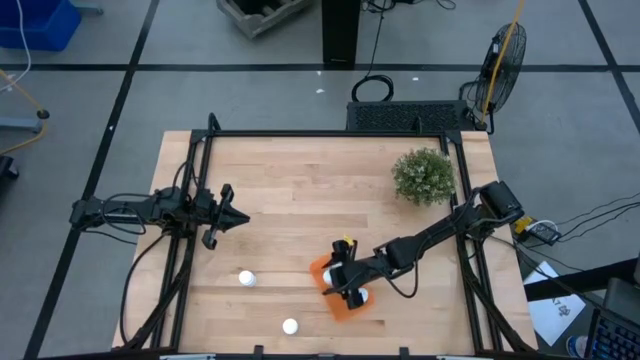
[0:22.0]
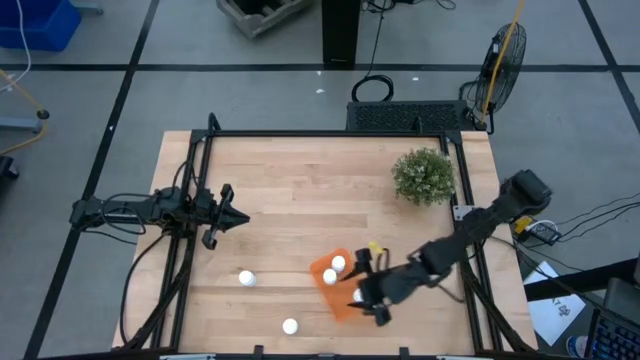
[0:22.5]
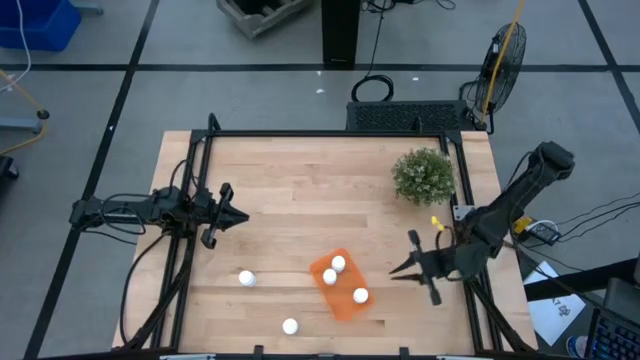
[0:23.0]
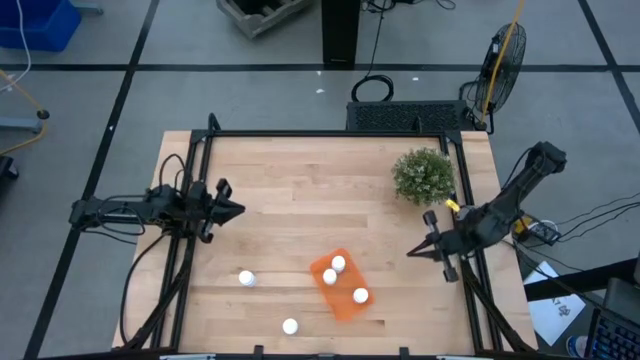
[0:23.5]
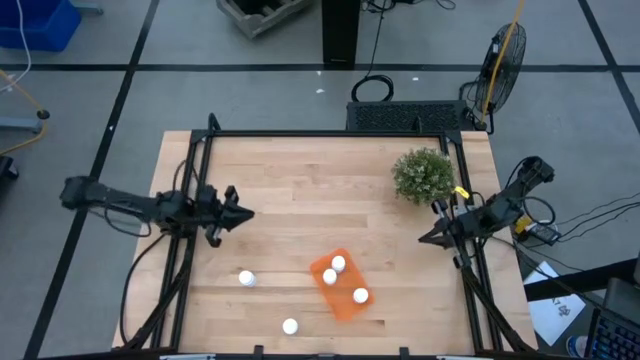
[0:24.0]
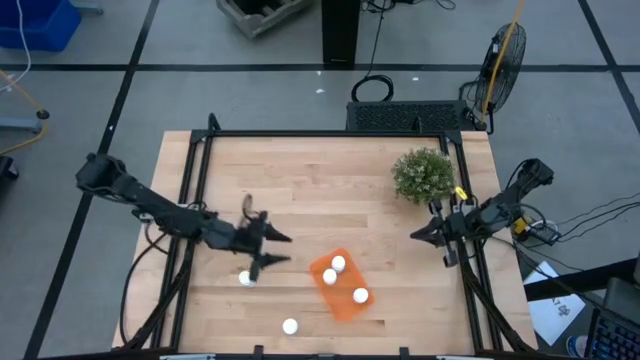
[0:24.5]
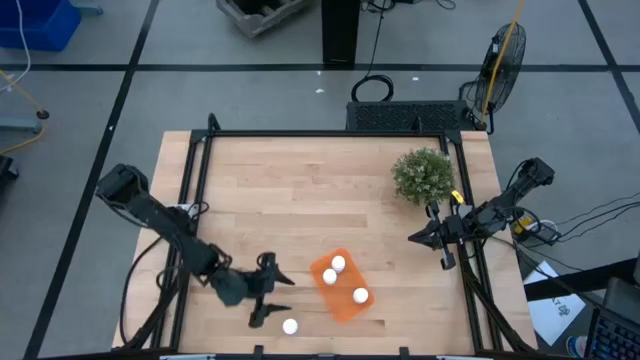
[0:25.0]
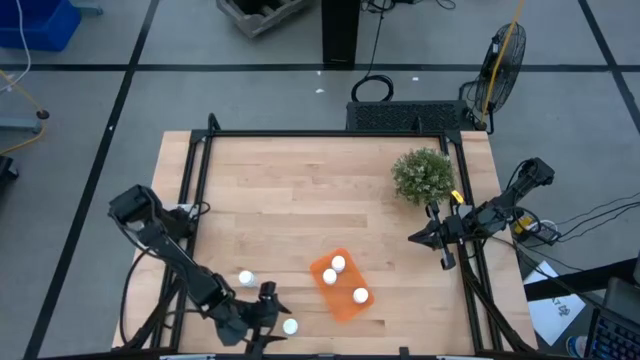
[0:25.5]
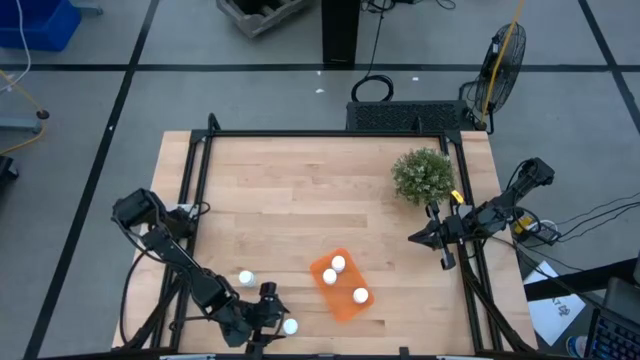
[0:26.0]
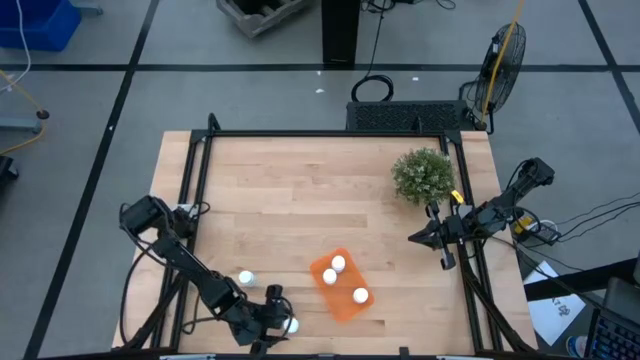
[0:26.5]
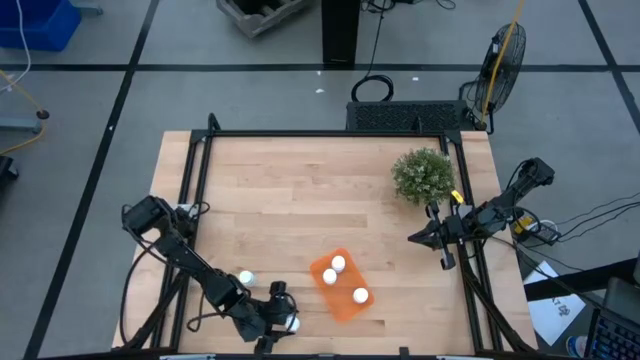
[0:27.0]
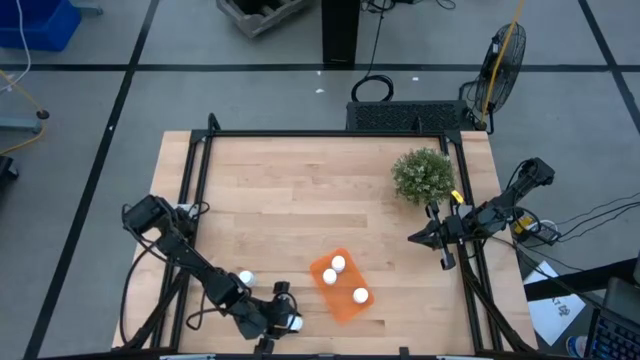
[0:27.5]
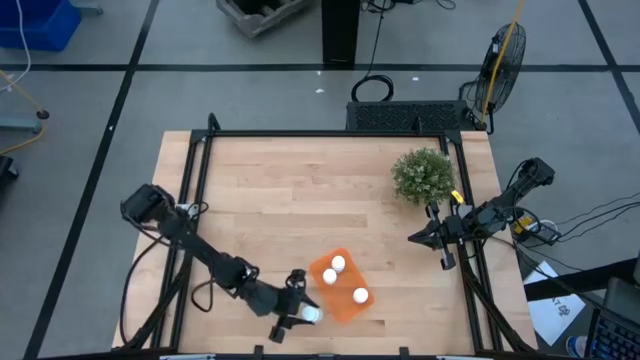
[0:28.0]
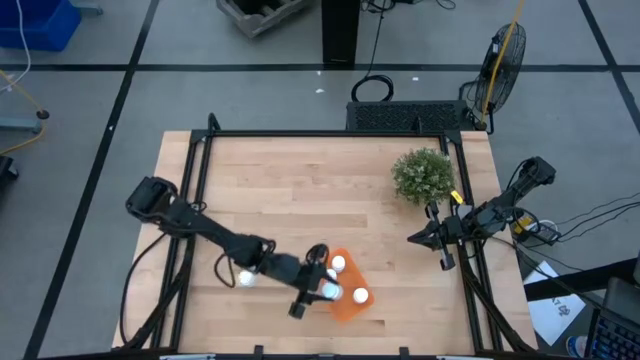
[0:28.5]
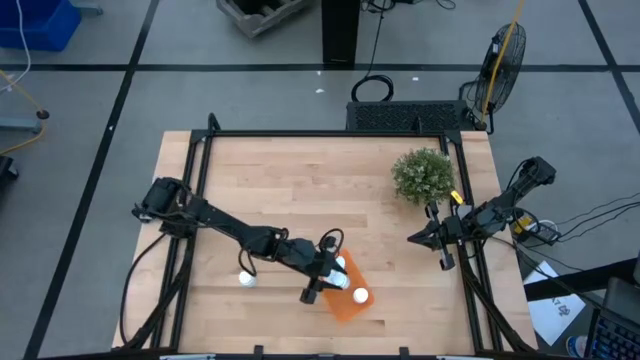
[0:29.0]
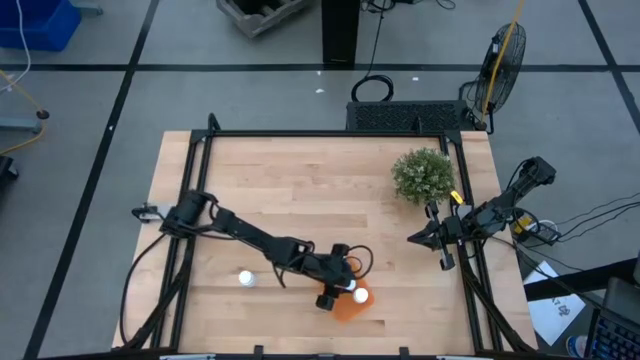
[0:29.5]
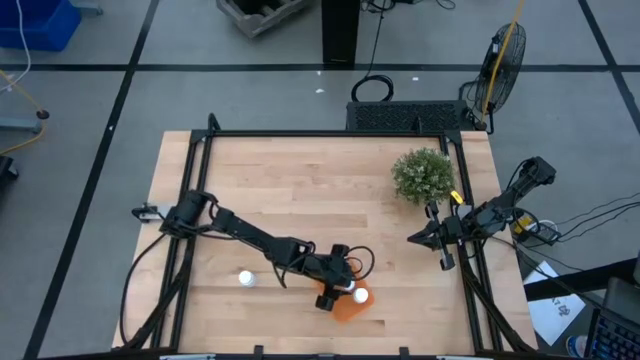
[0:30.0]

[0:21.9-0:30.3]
Task: Pick and place pill bottles into a basket
Put the white pill bottle into the orange bin

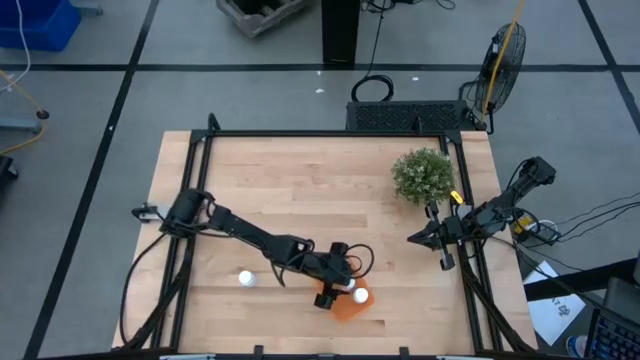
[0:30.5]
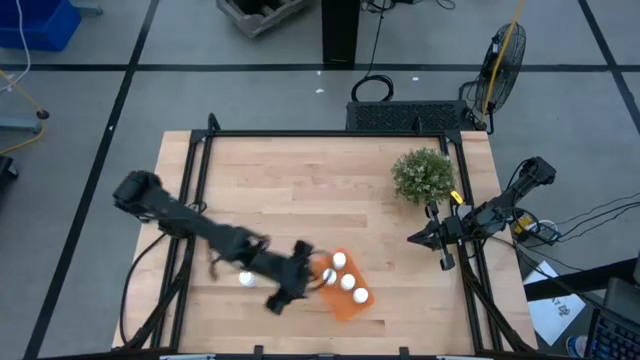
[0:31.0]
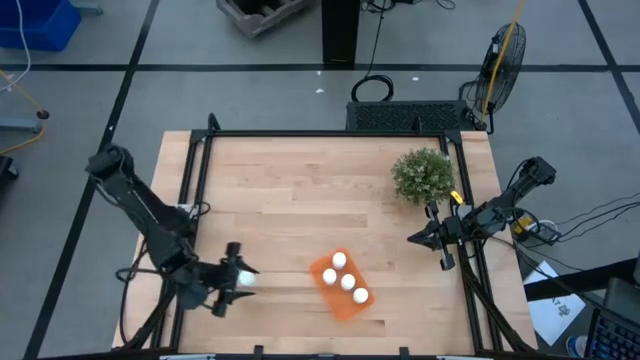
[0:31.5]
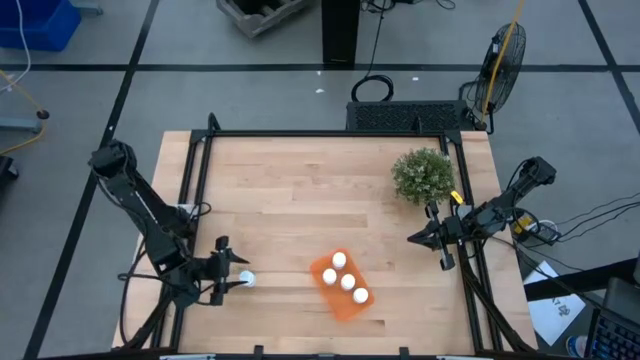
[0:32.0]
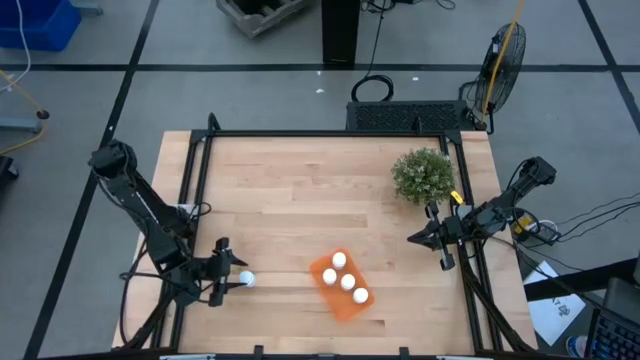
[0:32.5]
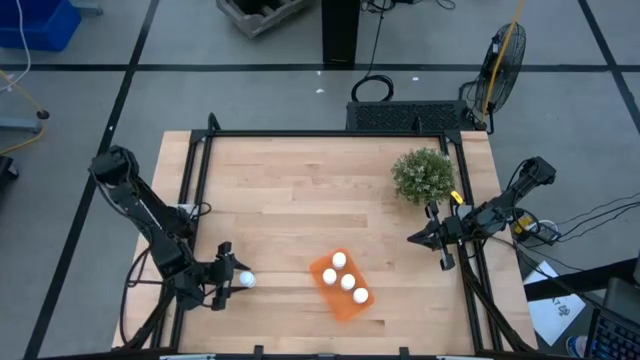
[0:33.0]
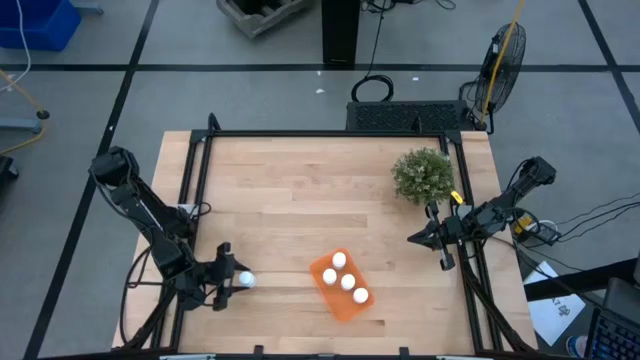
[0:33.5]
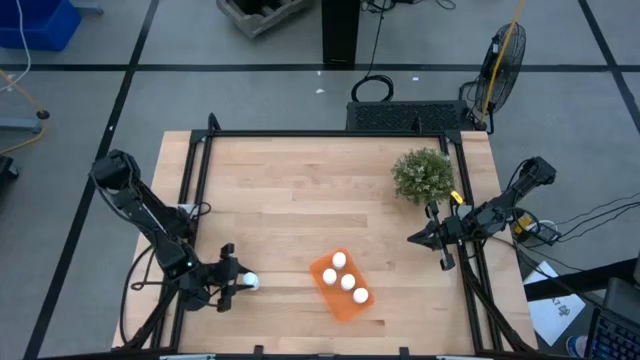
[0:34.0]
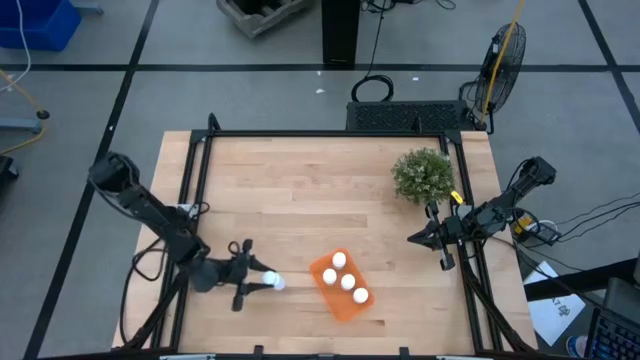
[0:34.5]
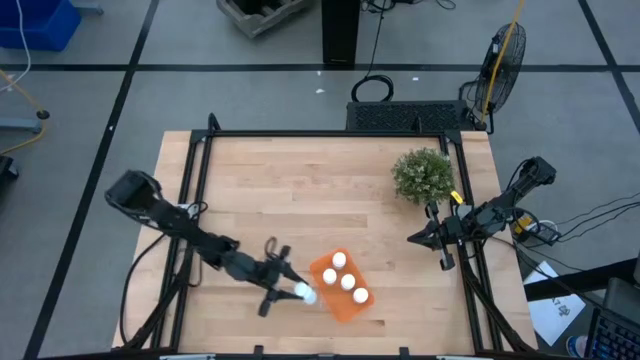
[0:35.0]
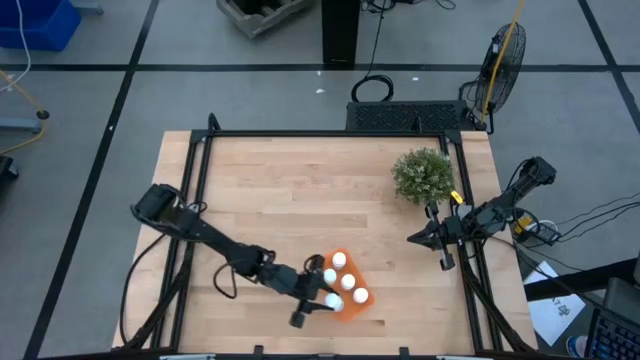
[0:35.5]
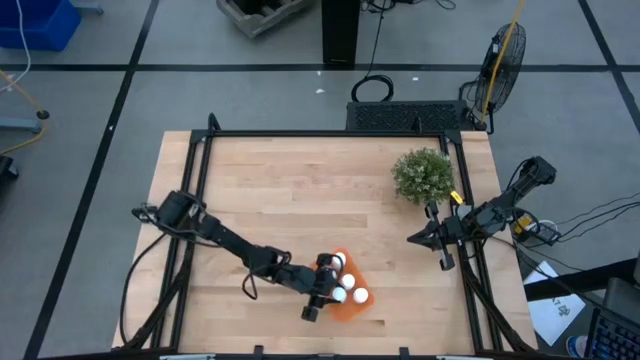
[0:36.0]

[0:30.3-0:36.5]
Put the white pill bottle into the orange bin

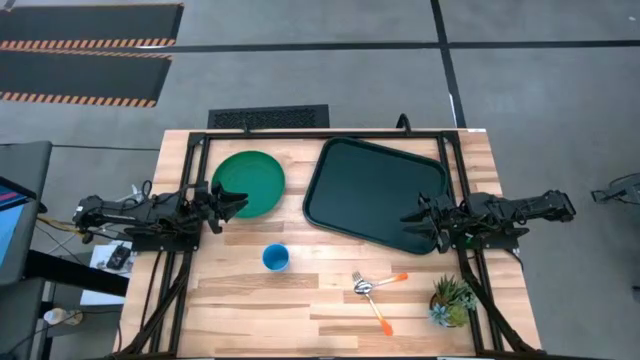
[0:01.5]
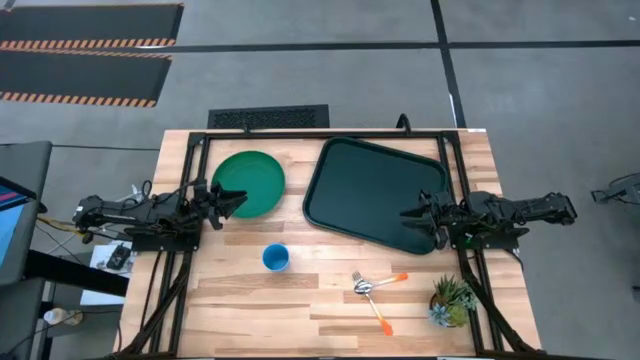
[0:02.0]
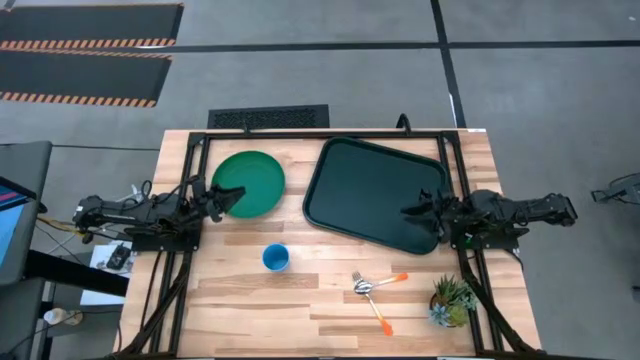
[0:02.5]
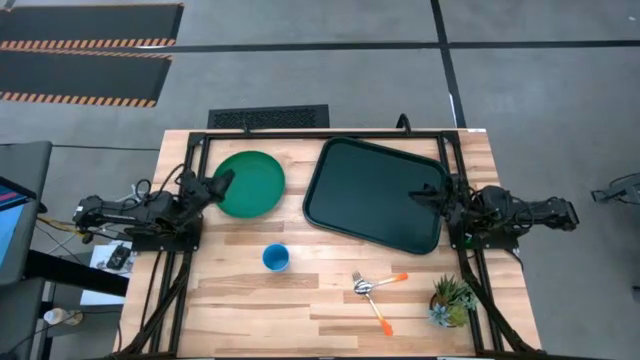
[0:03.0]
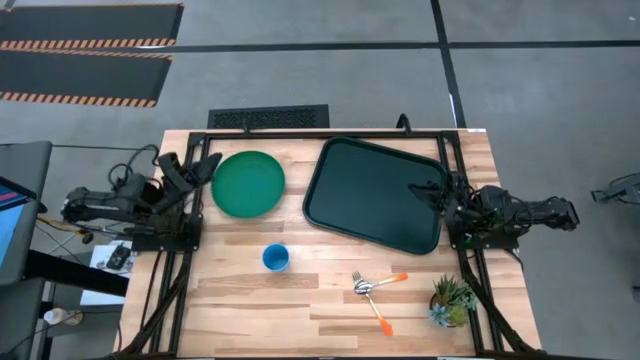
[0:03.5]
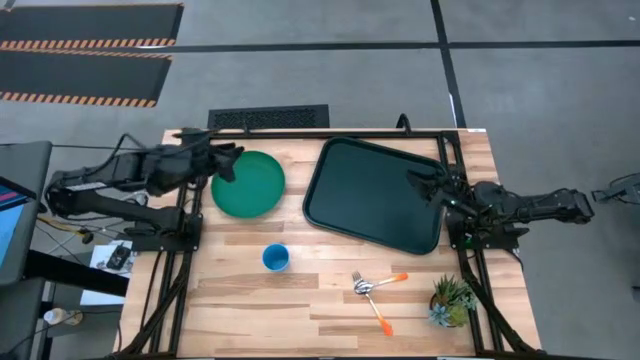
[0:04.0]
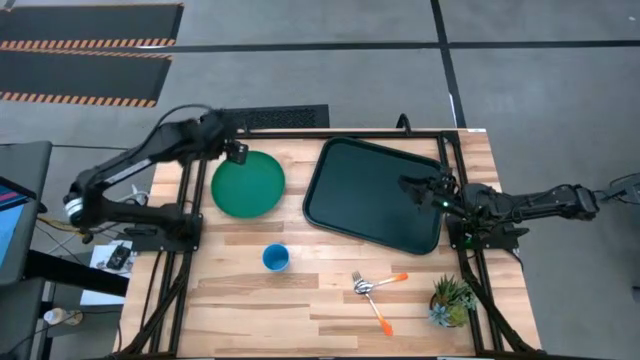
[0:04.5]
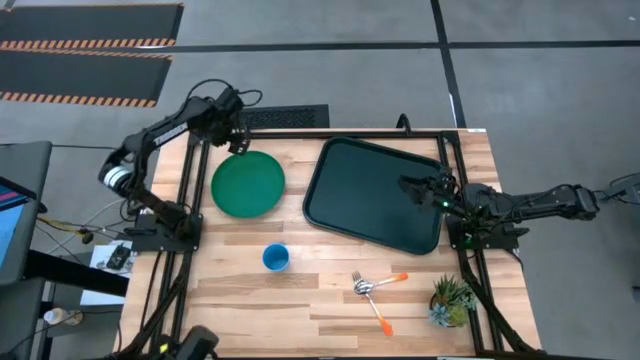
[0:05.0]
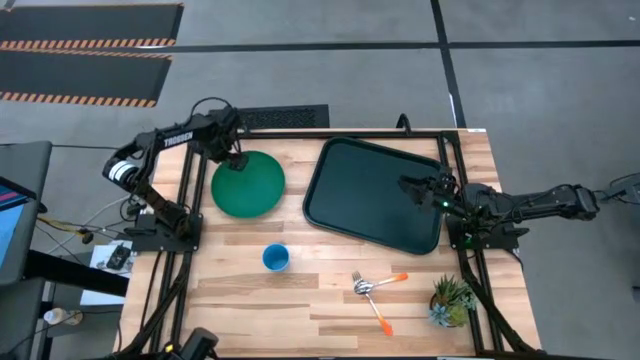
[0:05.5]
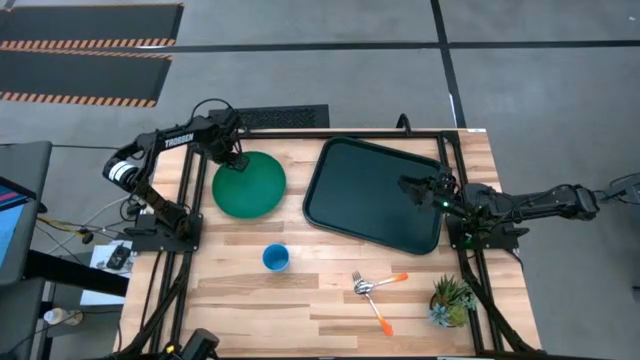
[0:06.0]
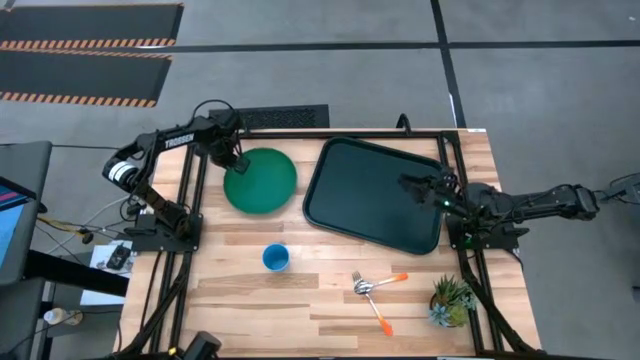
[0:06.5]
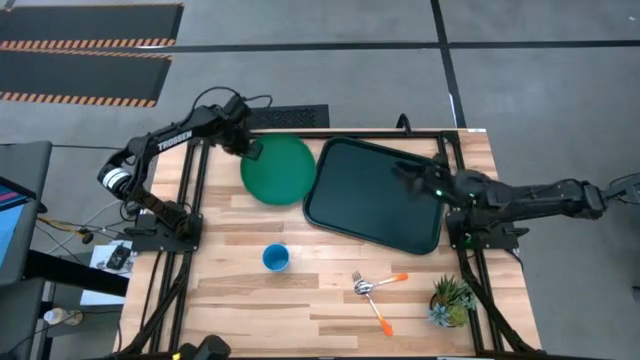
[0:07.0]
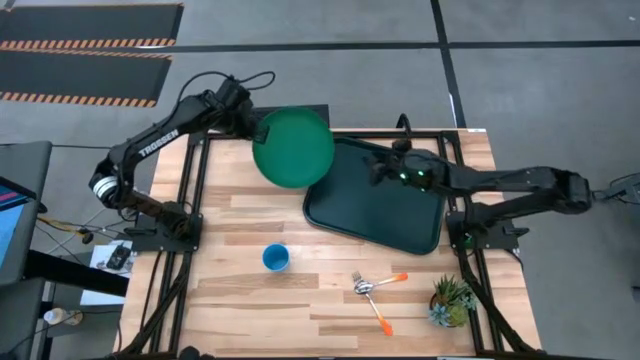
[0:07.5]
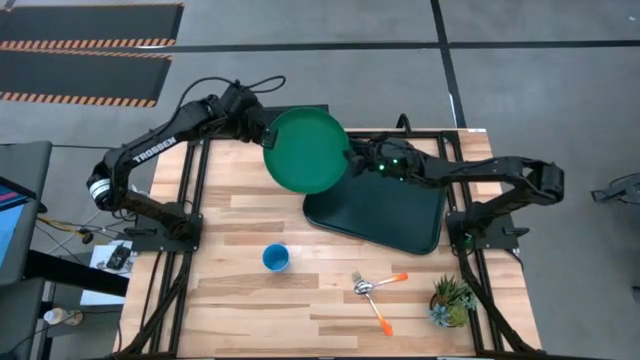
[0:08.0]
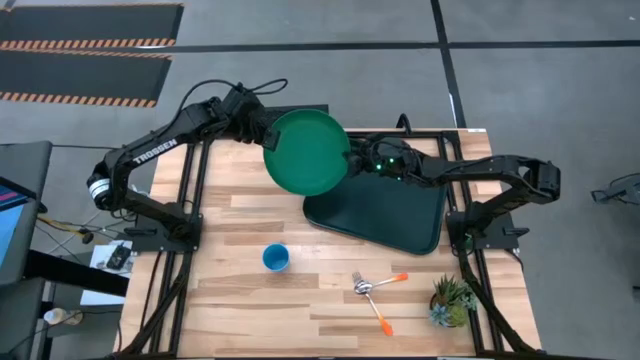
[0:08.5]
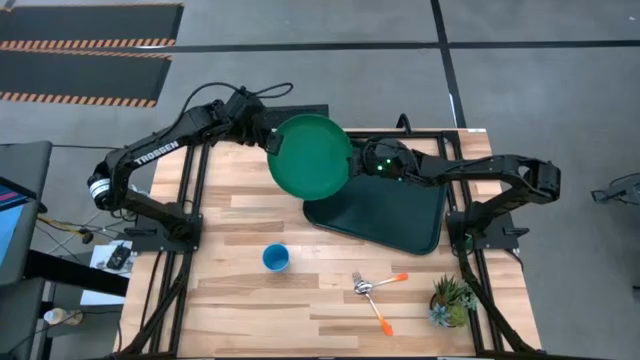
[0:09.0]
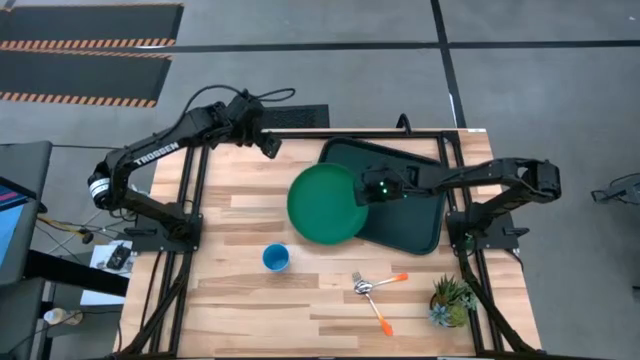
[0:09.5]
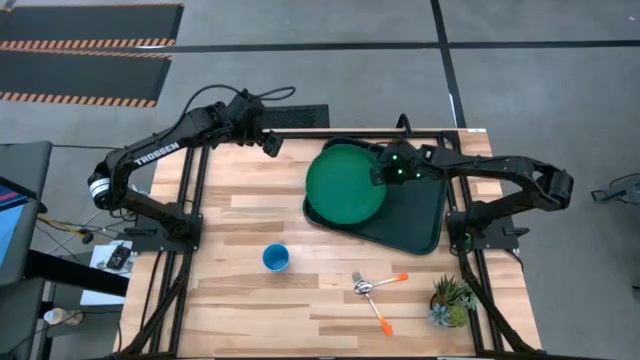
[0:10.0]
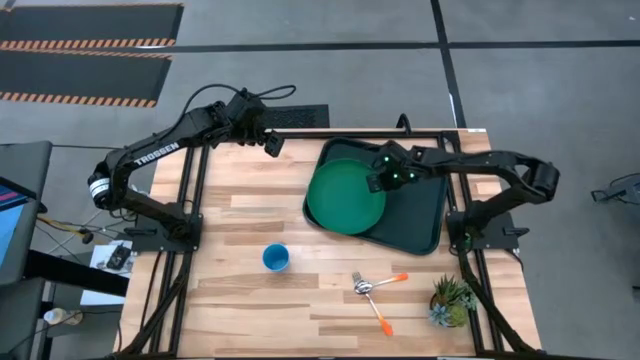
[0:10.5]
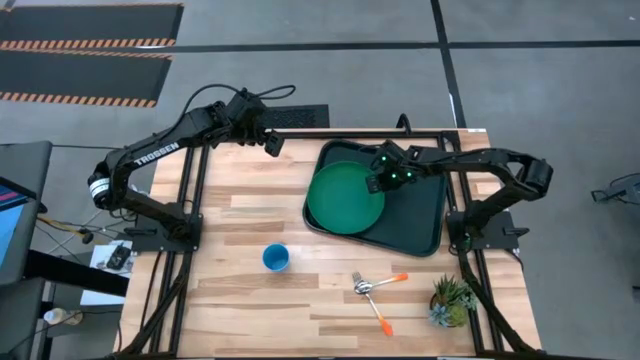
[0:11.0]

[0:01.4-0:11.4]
Task: Pick and place plate/cup/fork/spoon on tray
Put the green plate on the black tray
